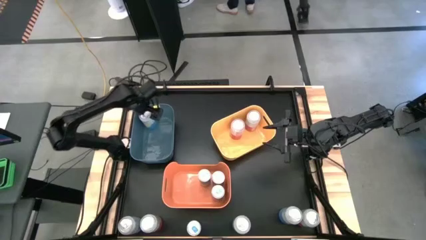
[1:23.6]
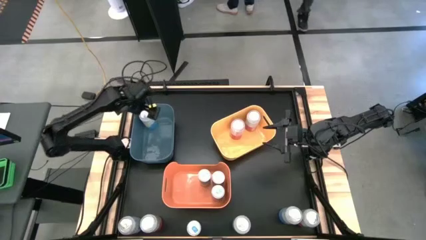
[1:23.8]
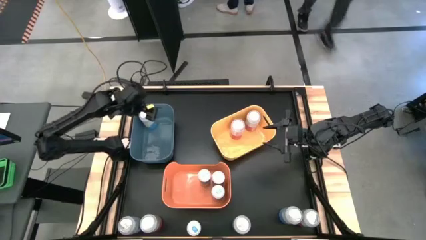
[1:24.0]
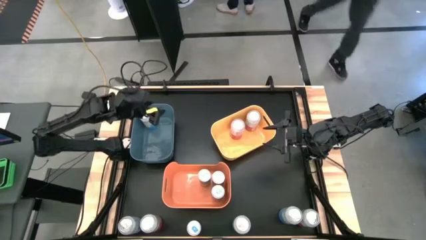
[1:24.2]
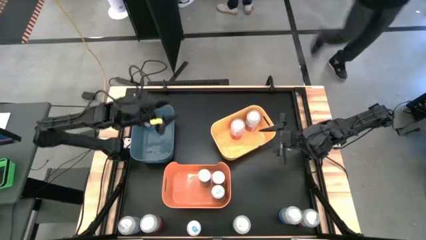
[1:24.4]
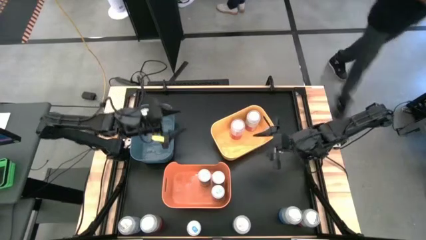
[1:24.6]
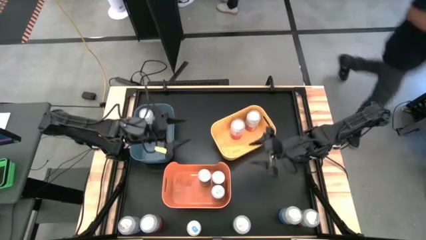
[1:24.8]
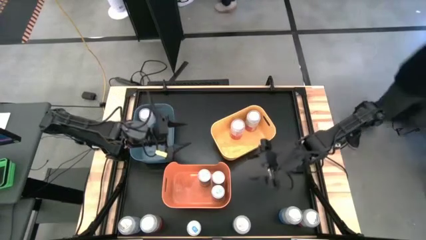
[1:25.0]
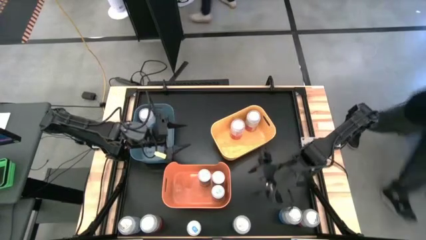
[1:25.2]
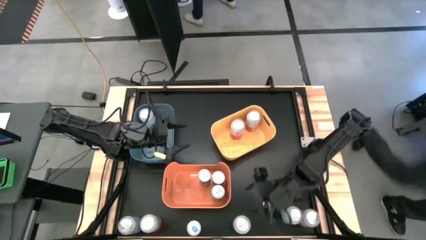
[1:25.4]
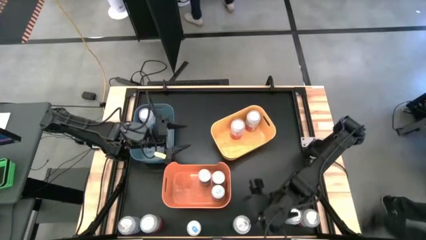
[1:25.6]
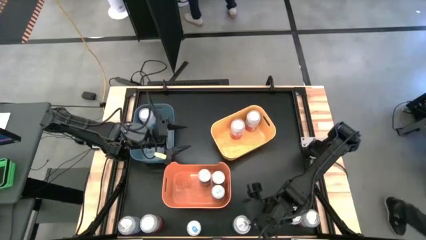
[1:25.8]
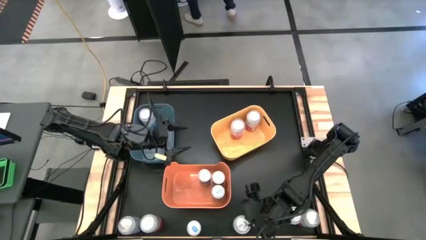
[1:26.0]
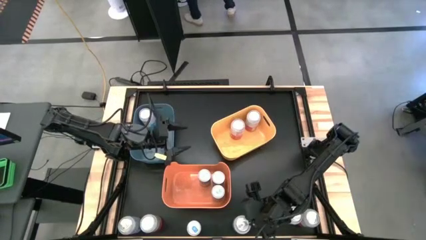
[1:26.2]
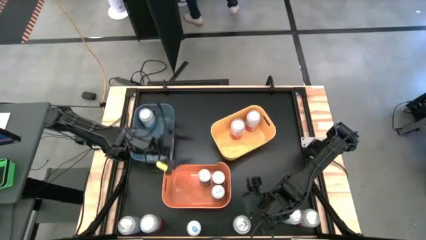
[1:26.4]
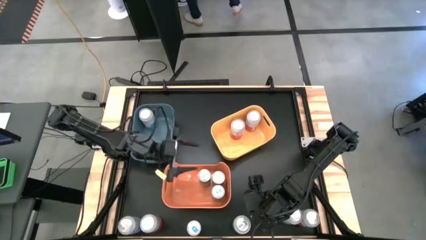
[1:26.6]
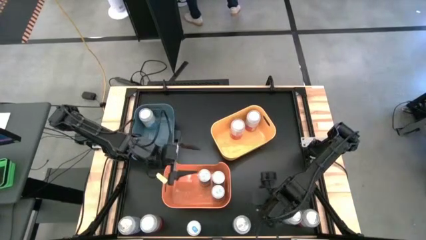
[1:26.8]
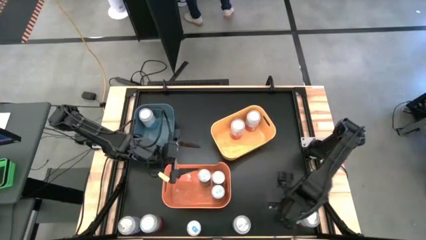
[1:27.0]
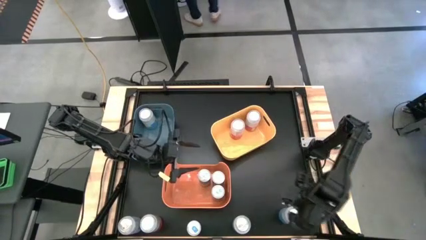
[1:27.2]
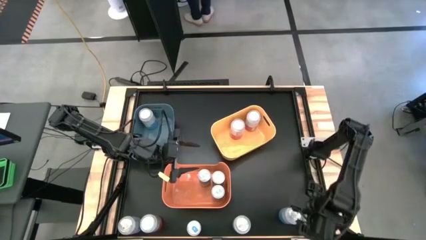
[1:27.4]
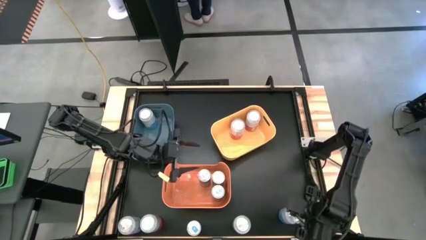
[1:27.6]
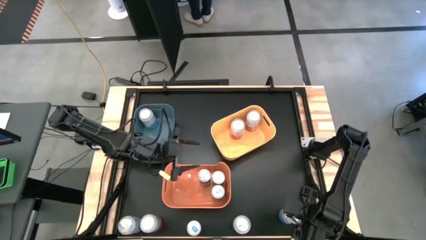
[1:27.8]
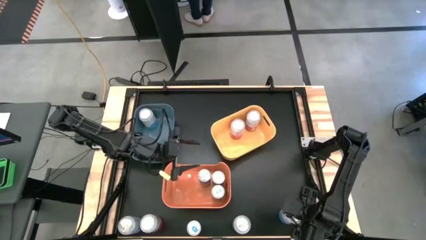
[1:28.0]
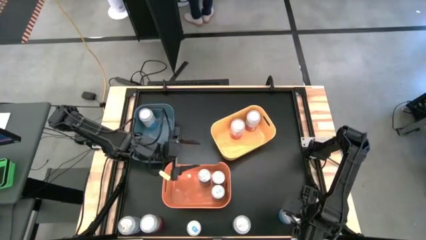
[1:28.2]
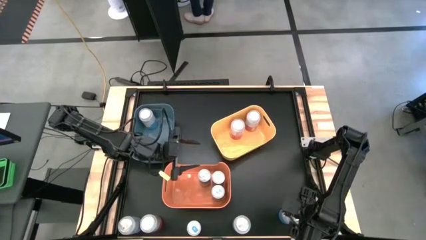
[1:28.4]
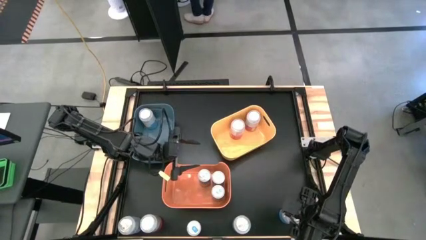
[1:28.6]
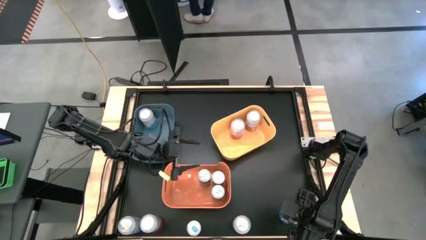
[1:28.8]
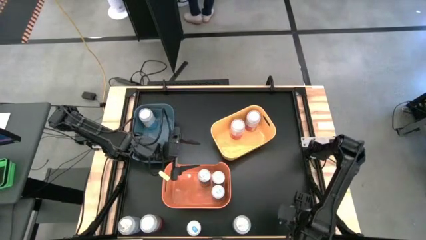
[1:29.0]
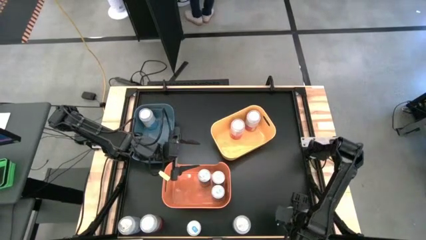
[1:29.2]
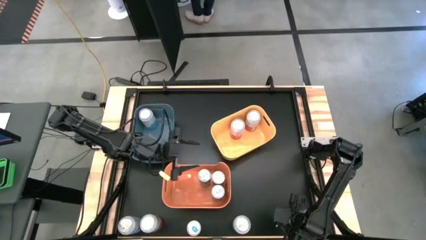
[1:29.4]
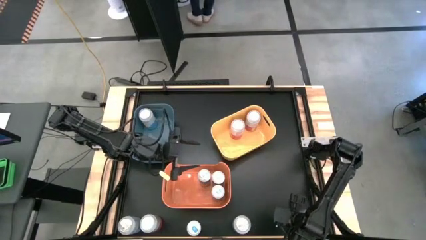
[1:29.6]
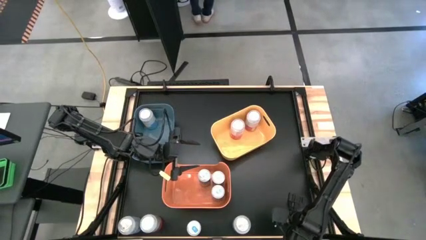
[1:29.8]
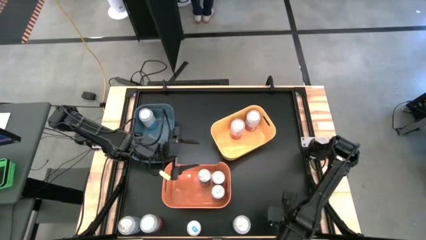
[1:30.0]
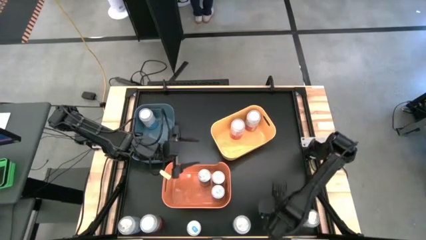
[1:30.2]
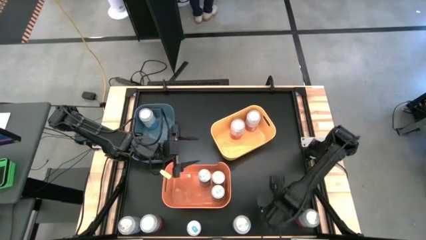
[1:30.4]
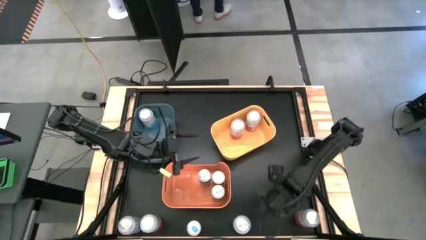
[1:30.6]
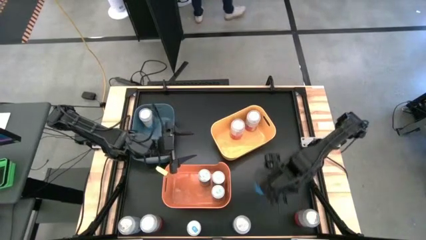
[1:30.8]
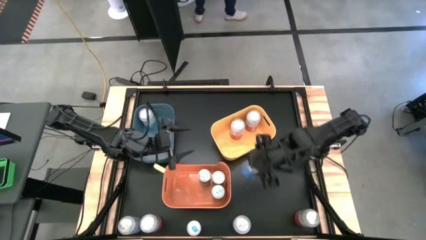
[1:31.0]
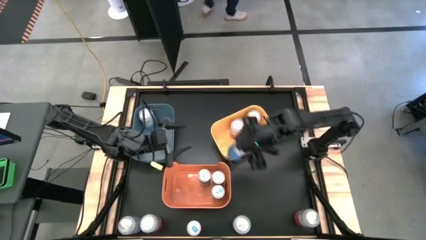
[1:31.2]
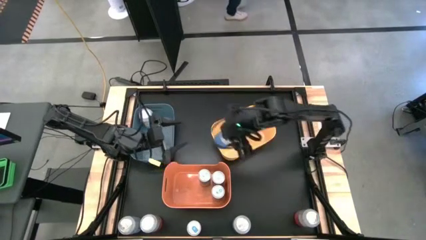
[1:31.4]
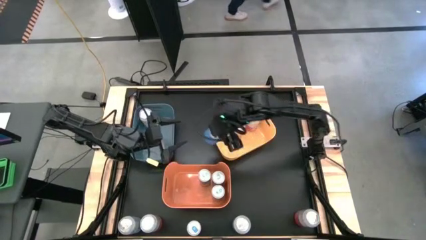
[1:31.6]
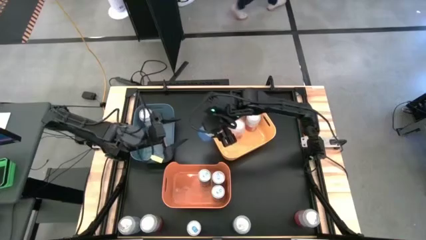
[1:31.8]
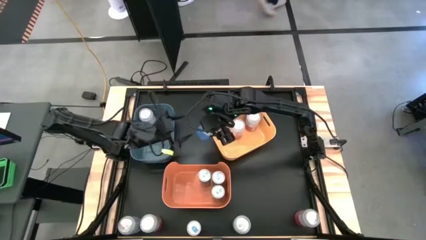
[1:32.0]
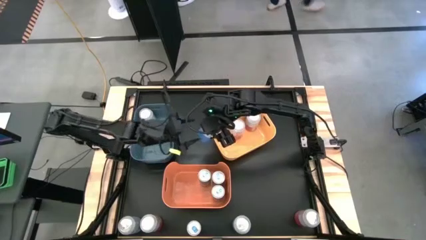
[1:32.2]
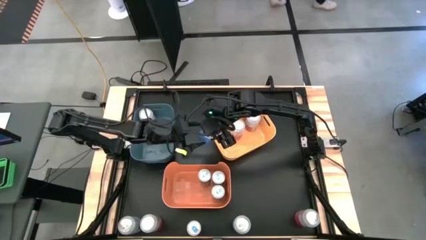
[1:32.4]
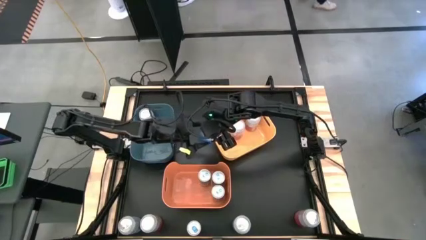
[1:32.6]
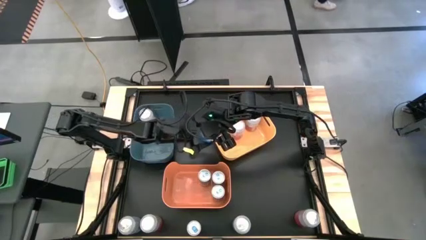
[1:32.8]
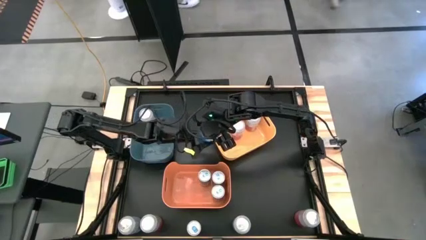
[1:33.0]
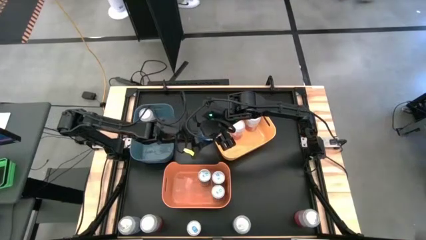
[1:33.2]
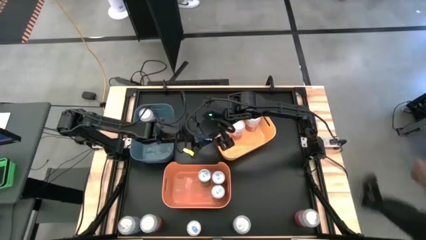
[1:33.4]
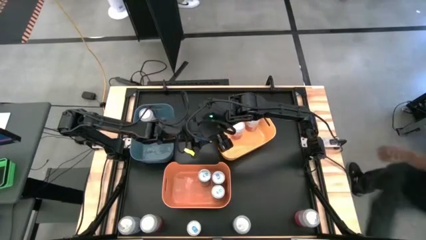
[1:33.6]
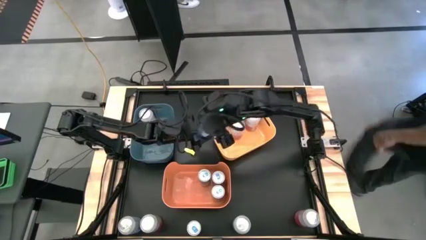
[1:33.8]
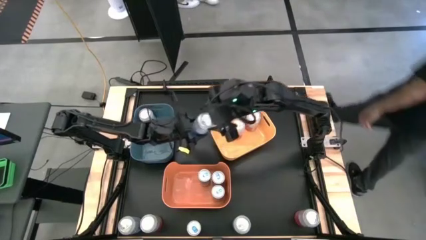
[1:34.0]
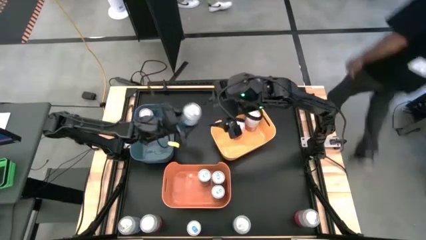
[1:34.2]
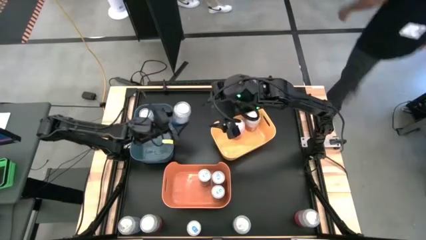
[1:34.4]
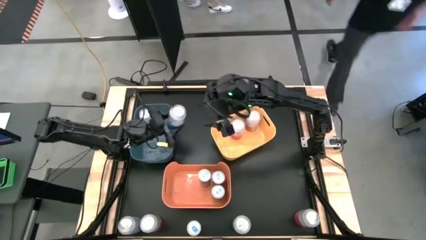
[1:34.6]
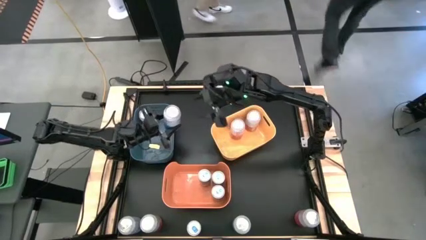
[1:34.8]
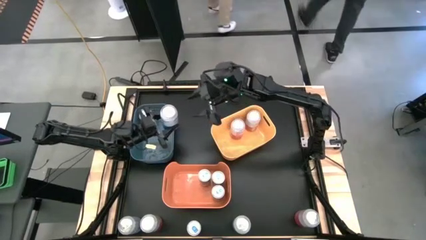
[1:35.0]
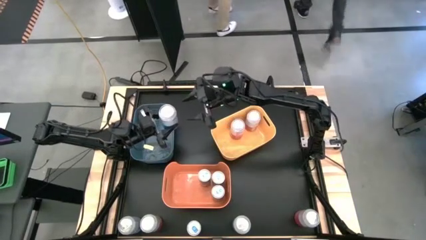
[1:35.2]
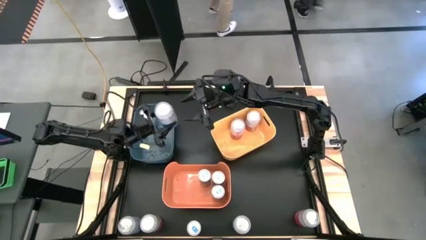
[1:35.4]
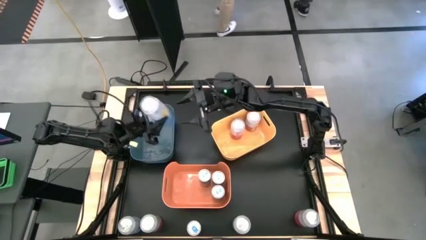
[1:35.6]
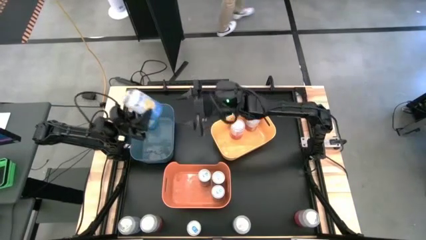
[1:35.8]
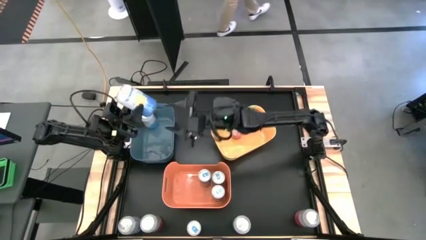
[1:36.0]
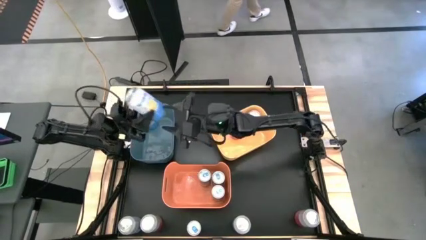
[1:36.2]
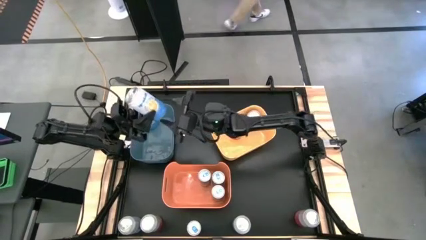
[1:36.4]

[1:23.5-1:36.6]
Task: Sort soda cans
Put the blue soda can into the blue bin

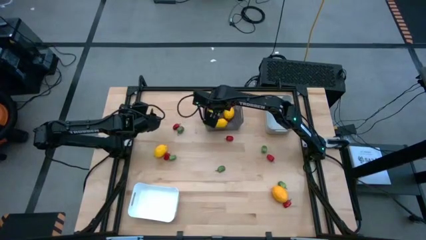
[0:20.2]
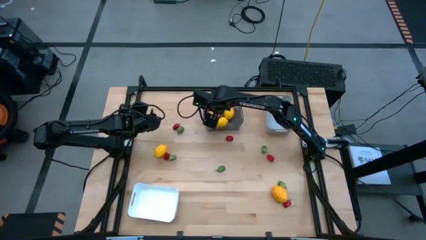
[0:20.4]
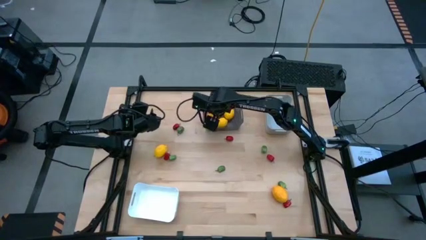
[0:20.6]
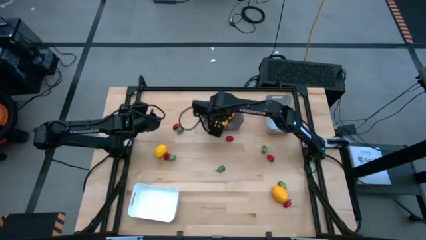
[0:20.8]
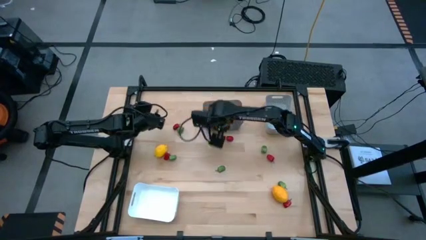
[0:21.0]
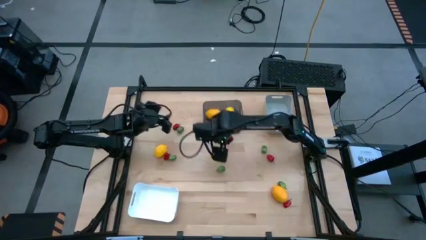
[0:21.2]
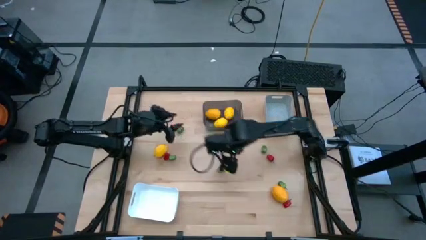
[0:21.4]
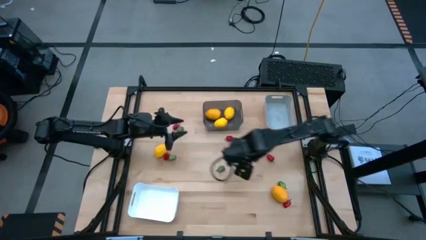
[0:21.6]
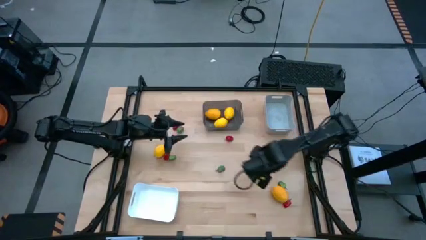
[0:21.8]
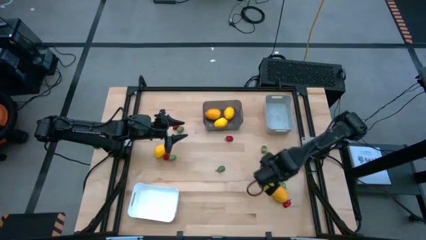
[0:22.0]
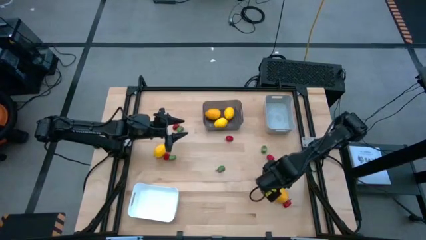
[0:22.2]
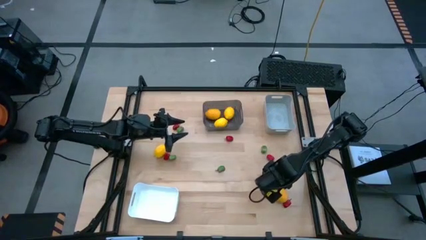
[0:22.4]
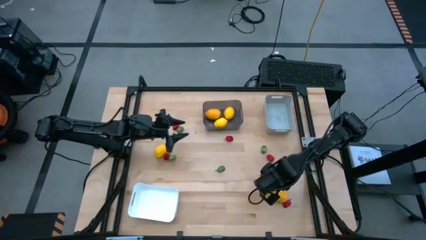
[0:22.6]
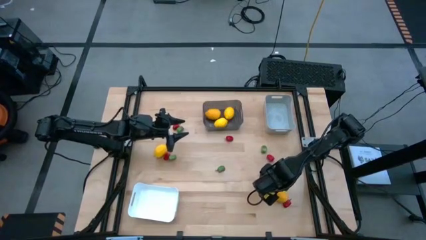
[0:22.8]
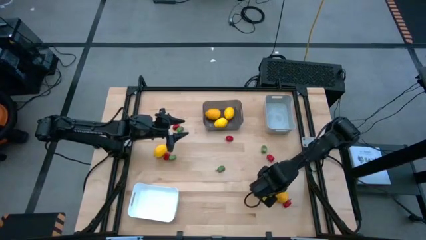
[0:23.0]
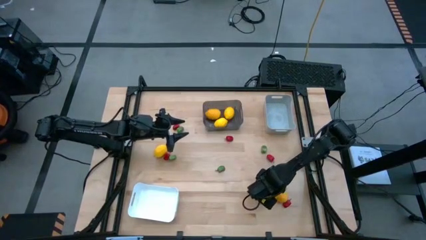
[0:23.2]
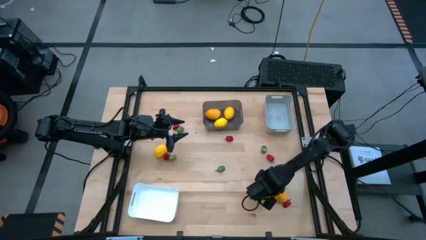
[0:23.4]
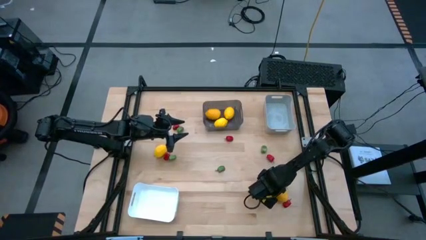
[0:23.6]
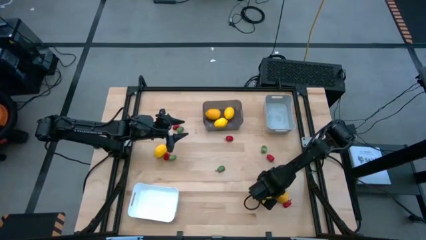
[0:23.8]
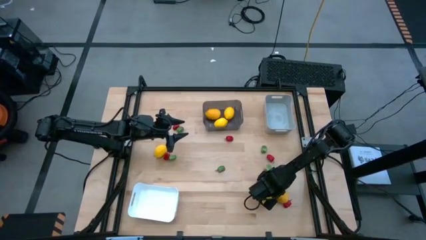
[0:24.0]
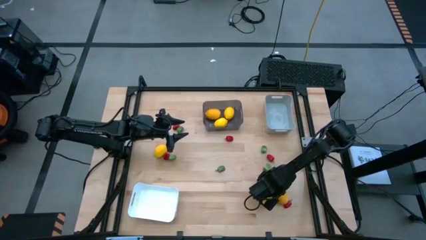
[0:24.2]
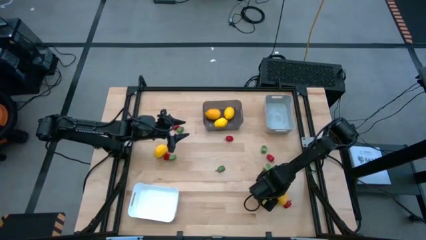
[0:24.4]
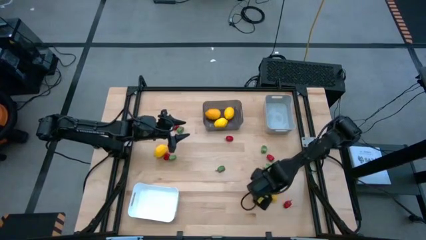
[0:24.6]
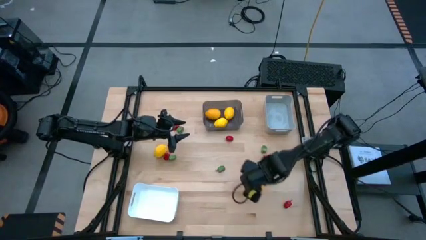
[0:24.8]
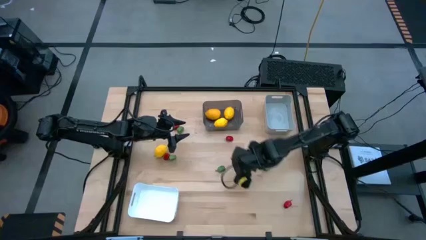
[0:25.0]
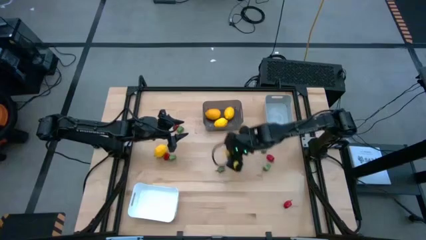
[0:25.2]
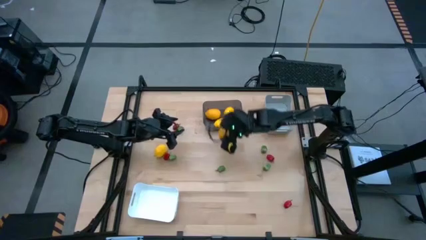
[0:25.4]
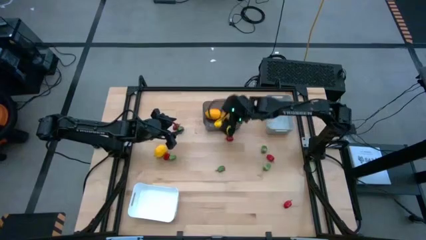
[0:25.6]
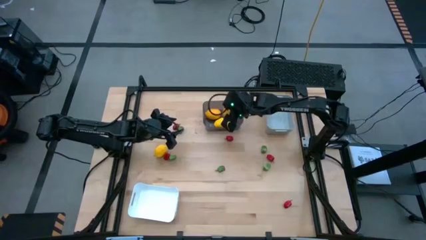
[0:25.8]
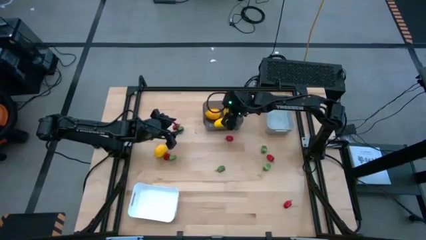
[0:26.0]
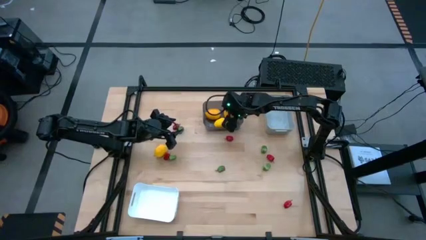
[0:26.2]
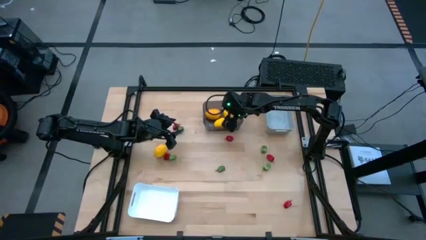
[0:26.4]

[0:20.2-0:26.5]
Task: Sort produce into baskets
Put the lemon into the black bin
